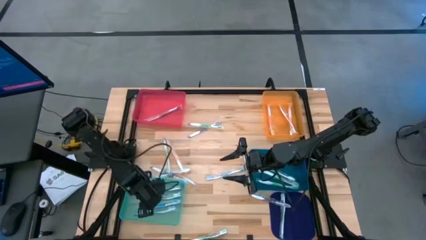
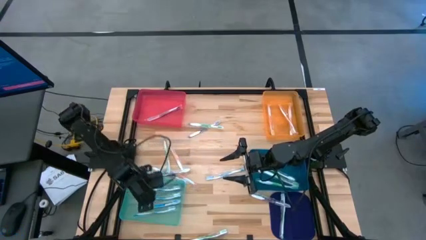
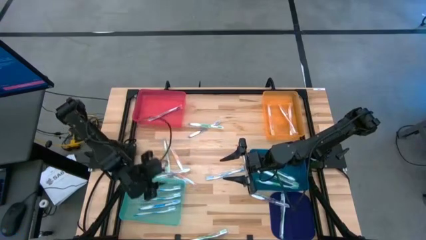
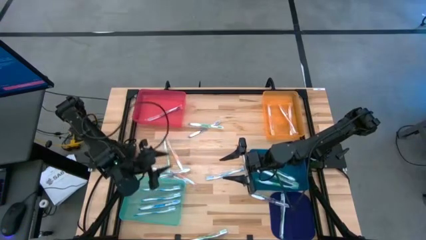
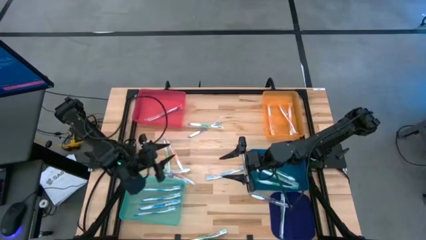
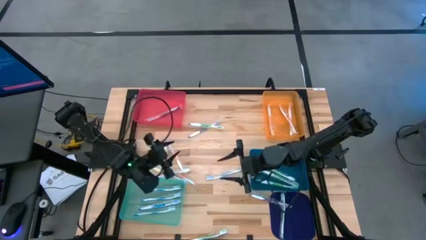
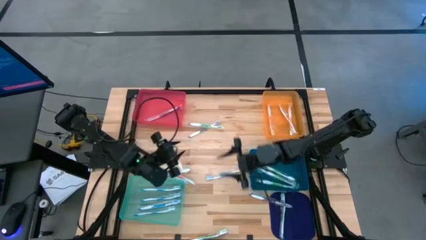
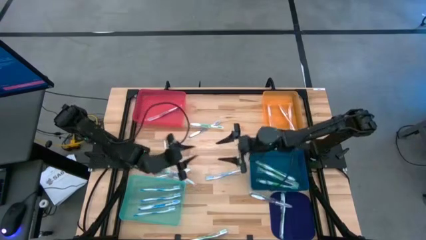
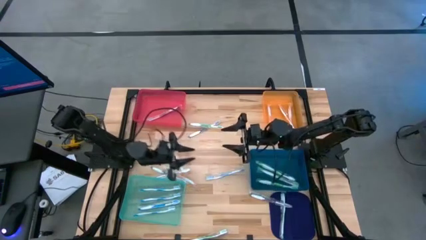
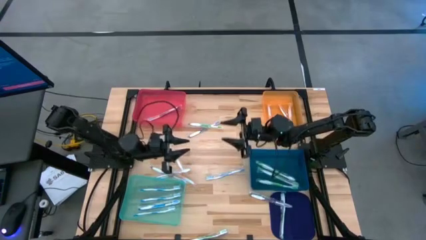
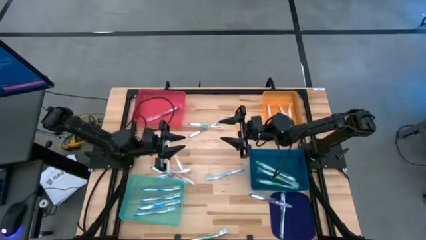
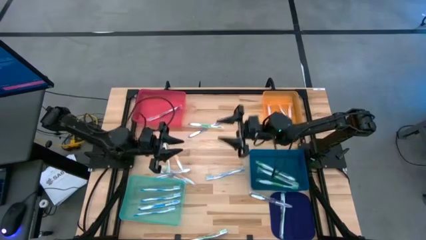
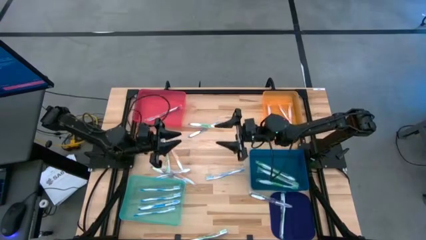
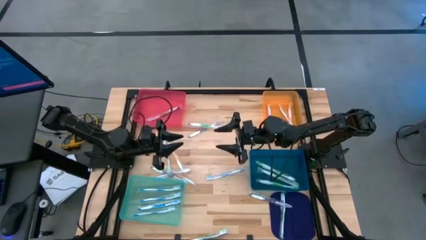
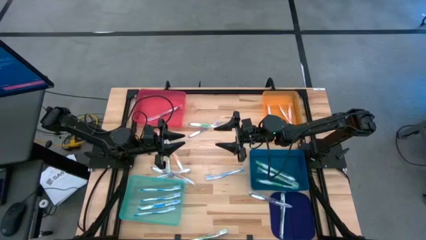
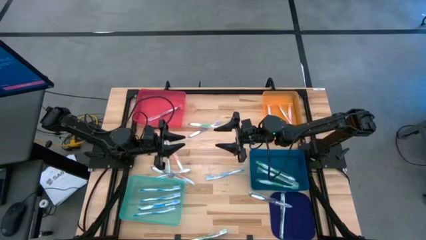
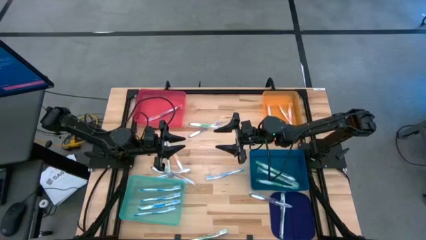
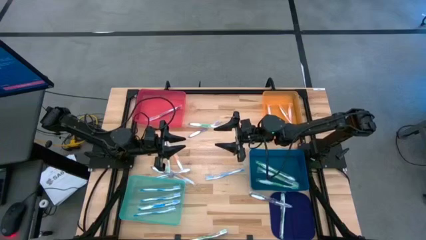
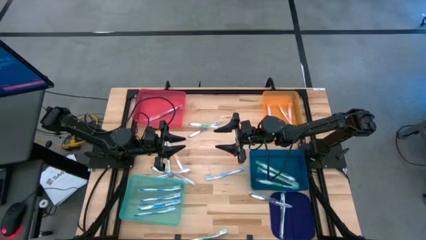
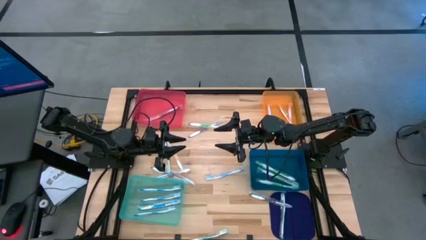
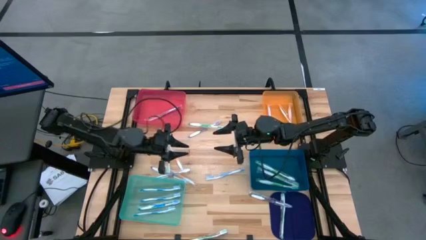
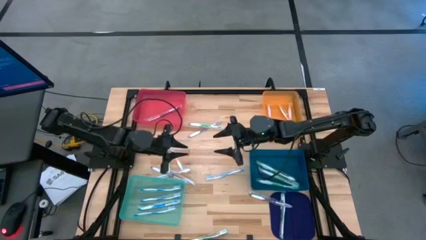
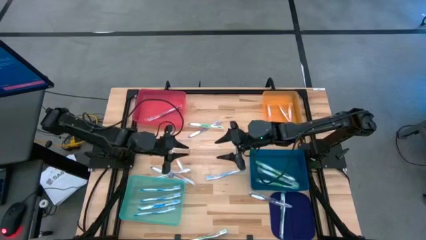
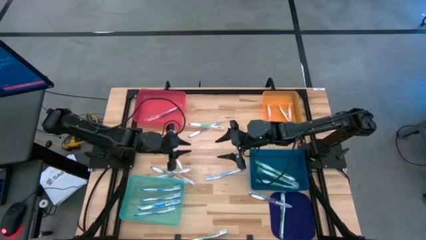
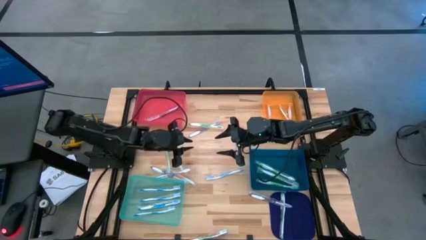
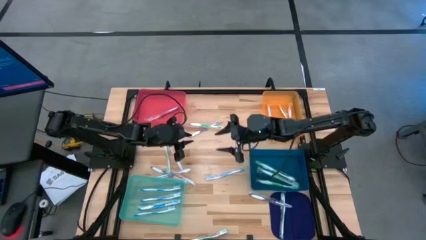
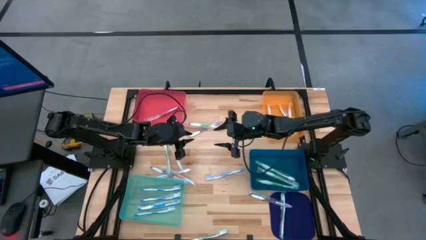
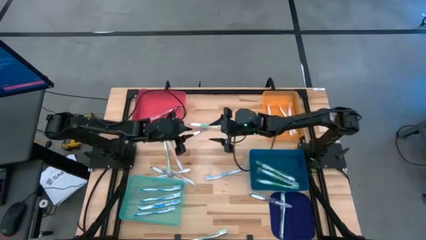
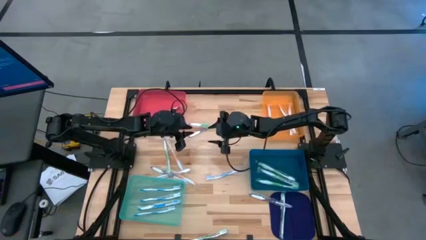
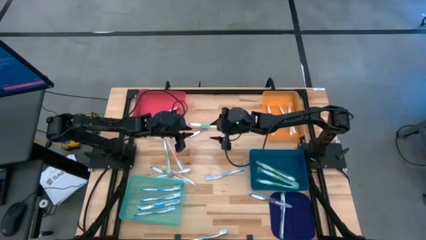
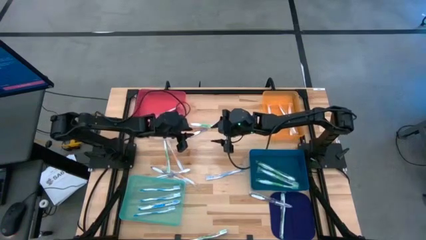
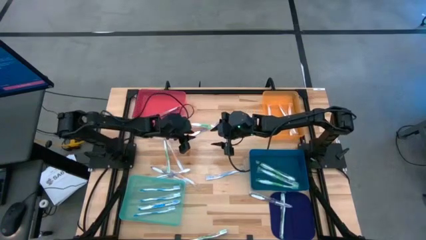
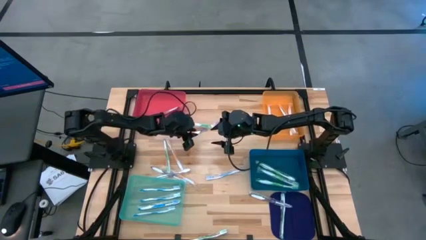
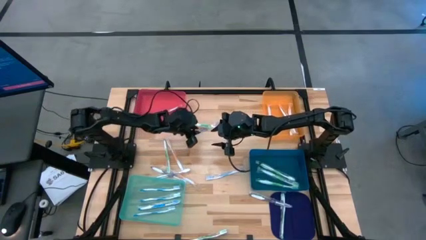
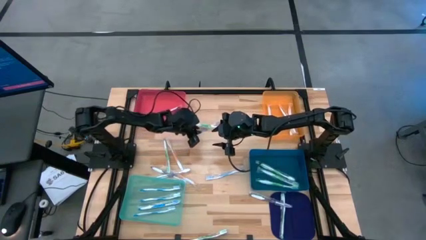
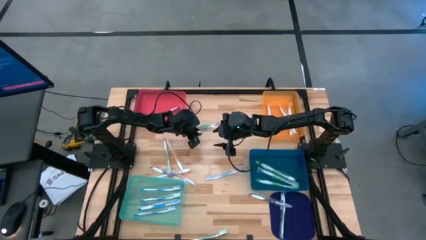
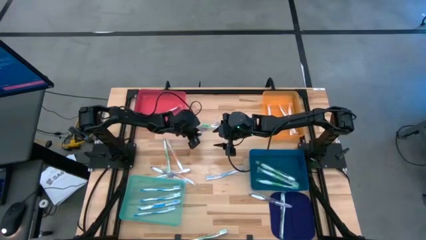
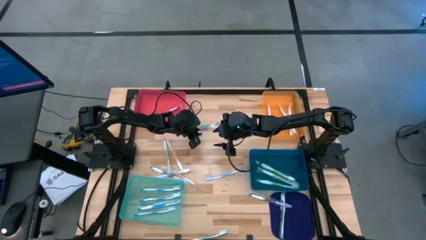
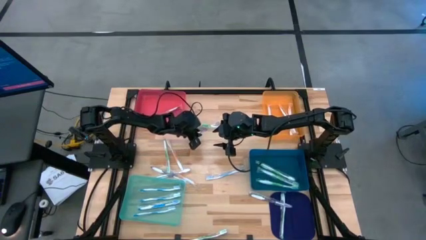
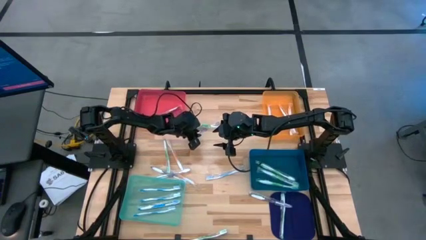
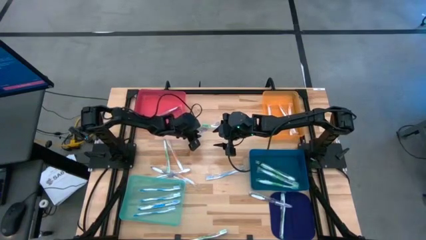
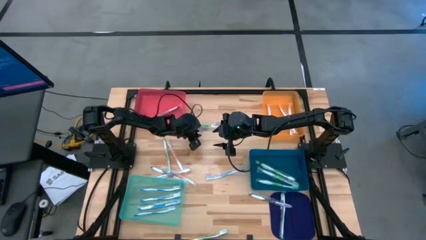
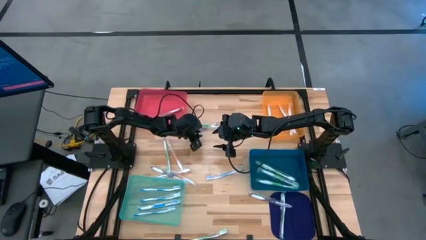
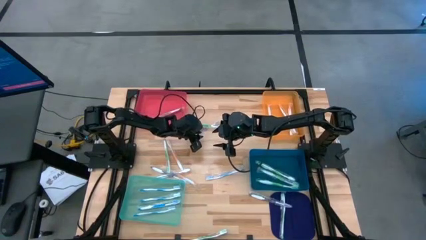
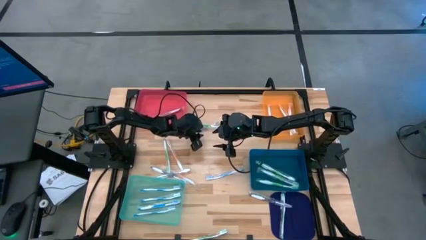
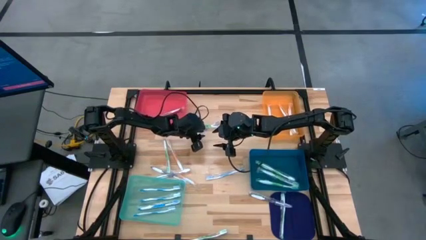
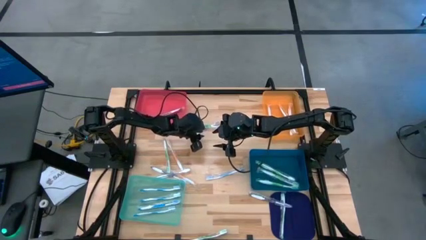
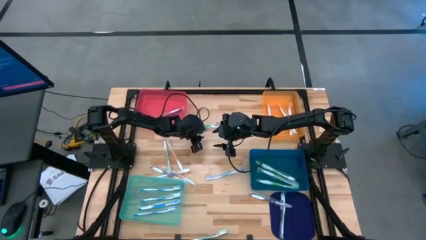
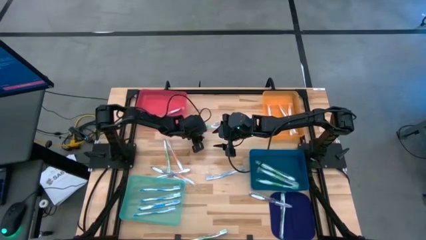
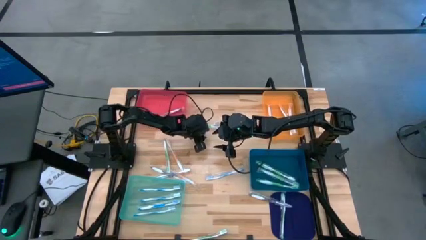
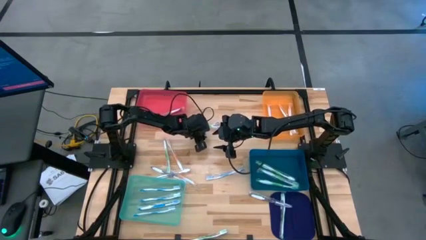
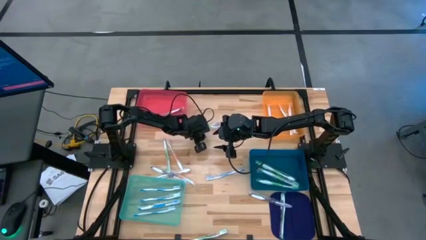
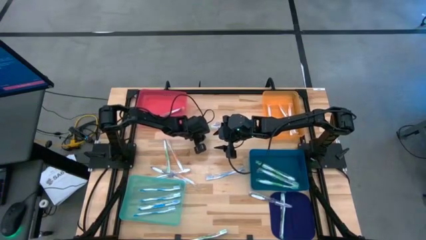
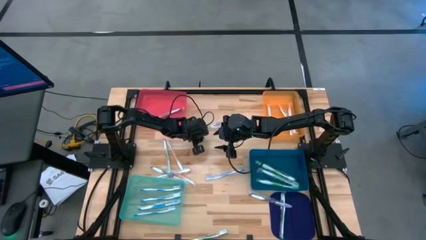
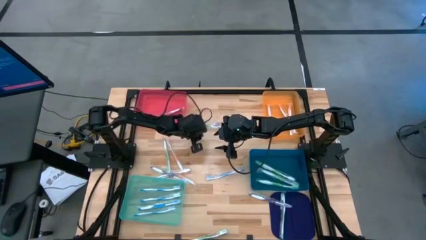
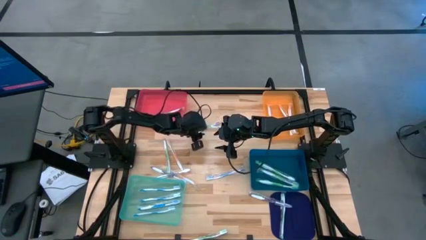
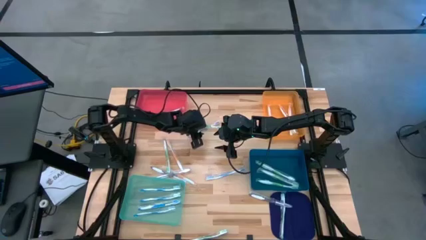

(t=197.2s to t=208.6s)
Task: Pick & Place Toothbrushes
Put the violet toothbrush into the pink bin

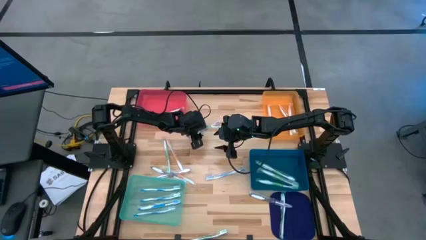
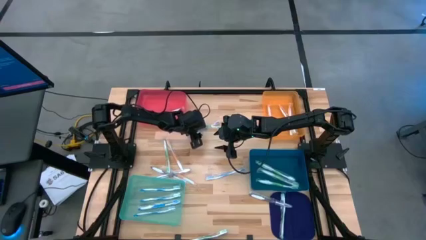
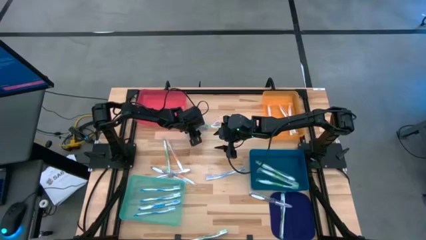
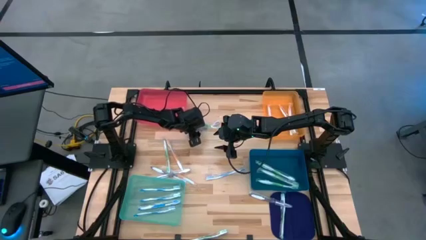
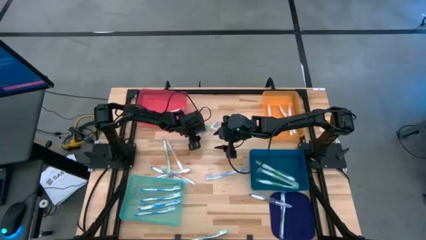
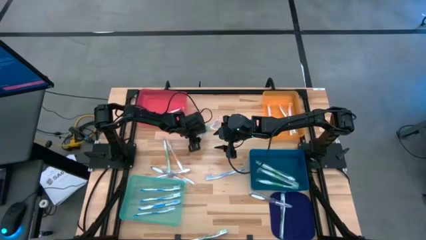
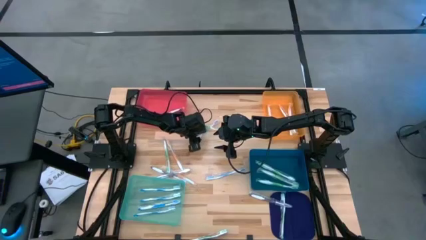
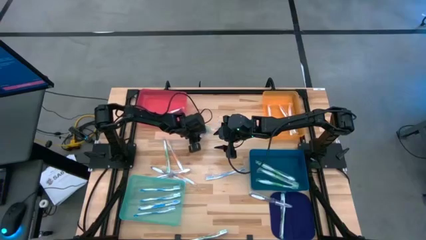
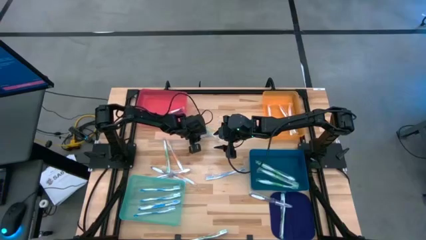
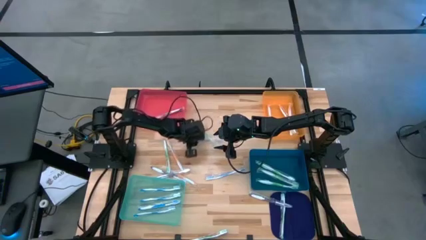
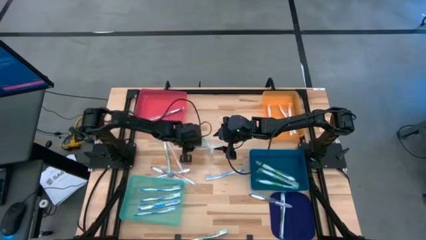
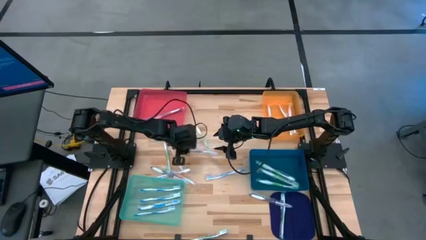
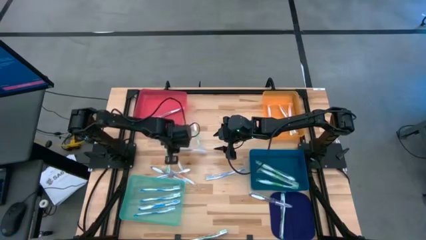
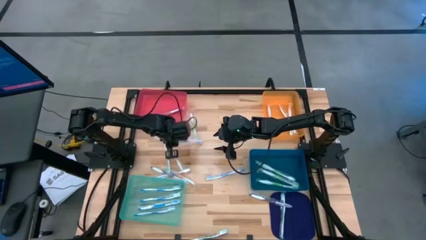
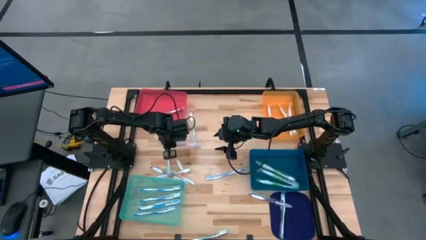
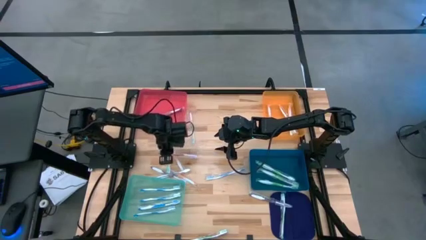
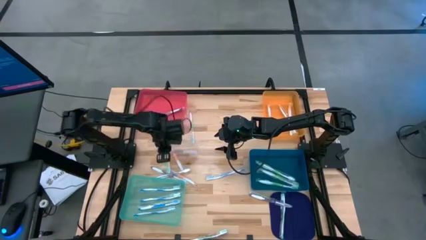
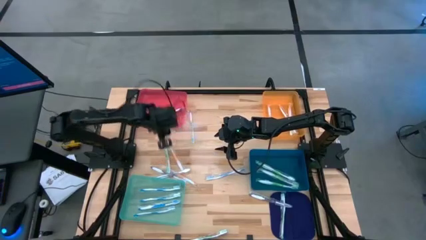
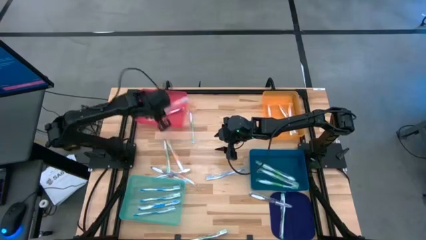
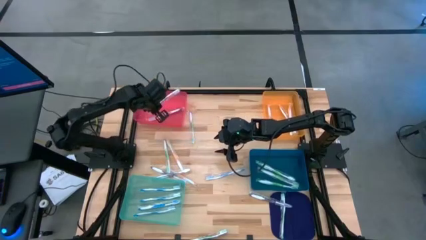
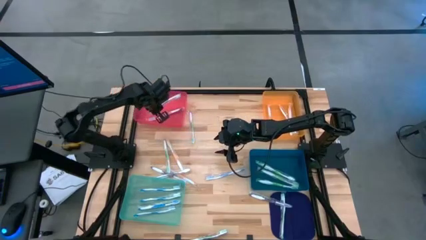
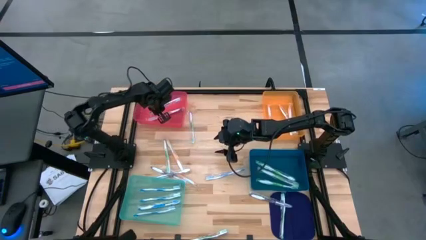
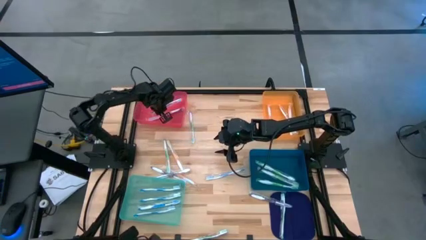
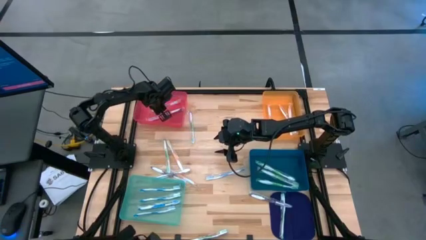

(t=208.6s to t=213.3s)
Put the violet toothbrush into the pink bin
